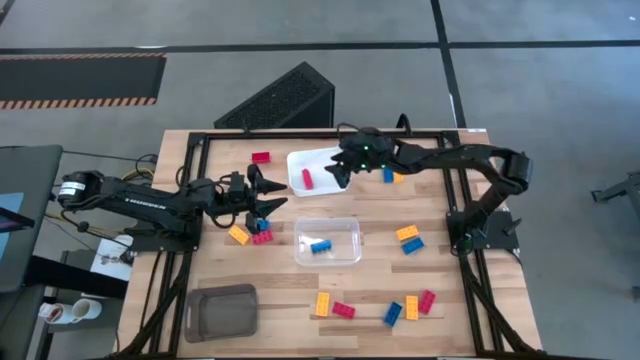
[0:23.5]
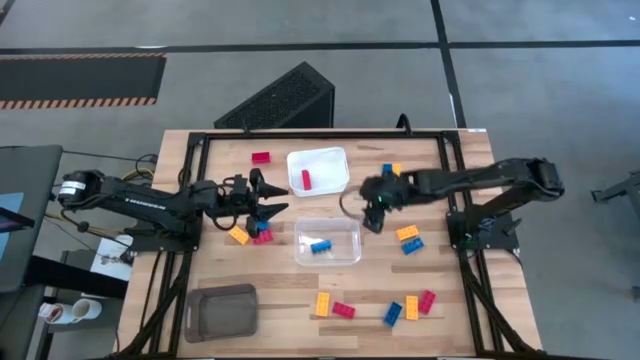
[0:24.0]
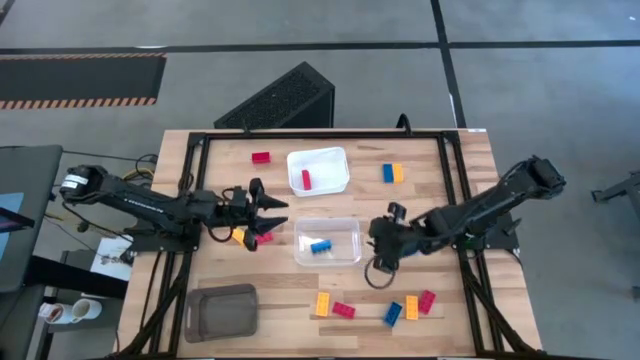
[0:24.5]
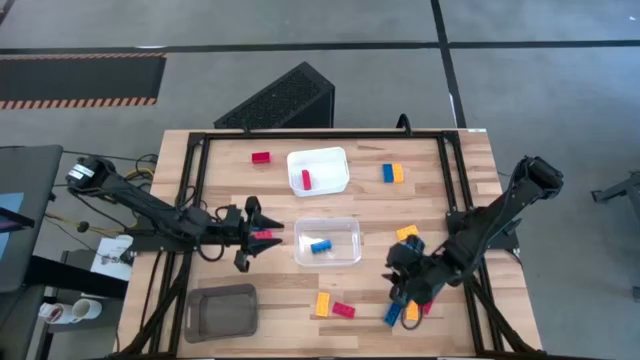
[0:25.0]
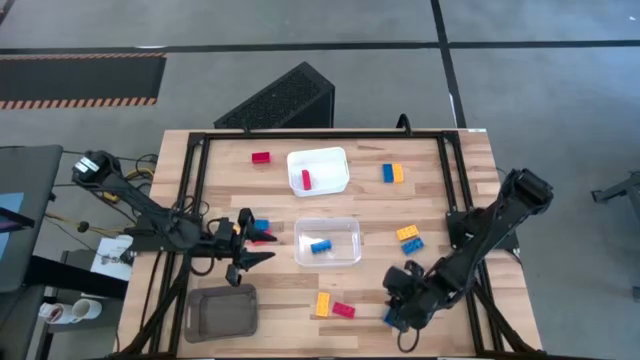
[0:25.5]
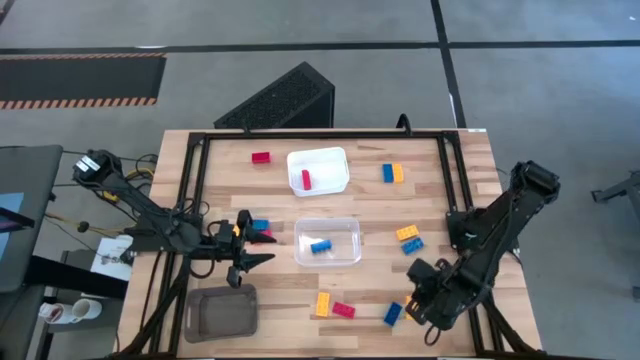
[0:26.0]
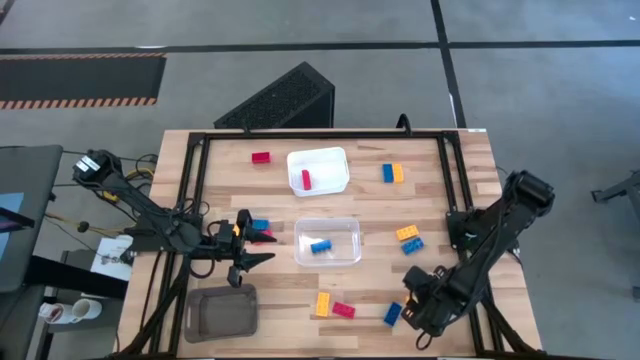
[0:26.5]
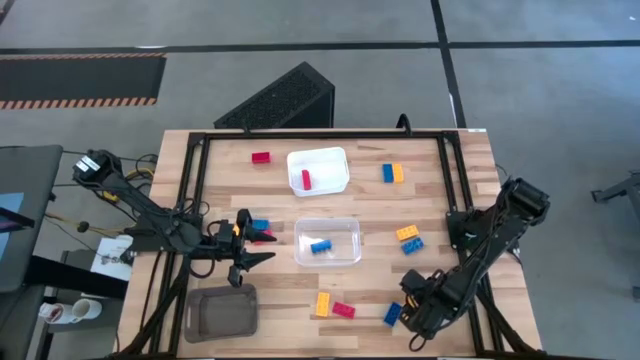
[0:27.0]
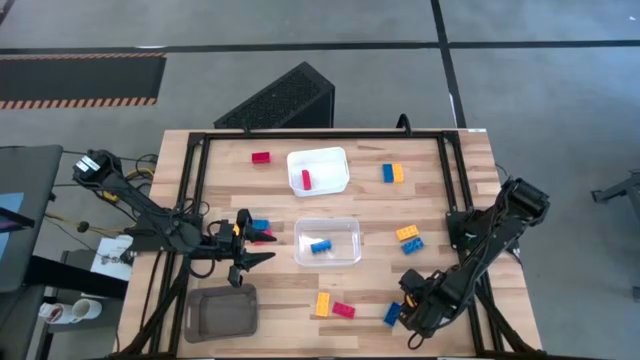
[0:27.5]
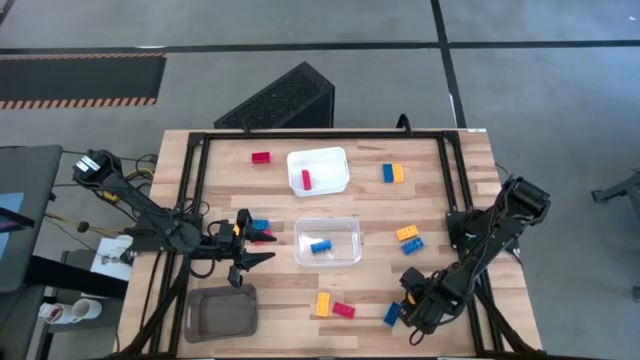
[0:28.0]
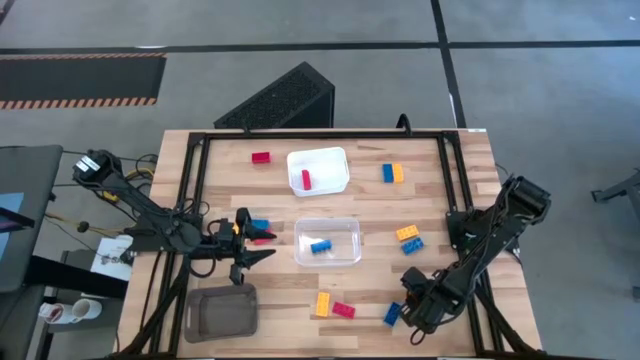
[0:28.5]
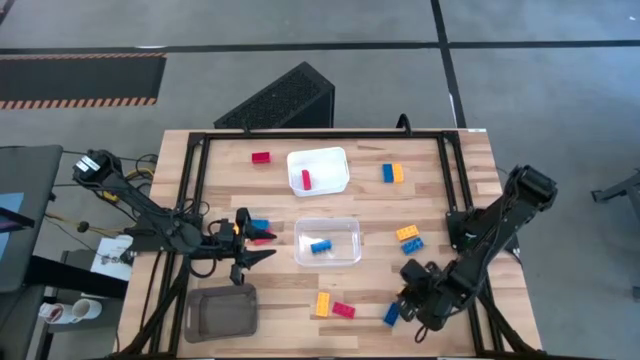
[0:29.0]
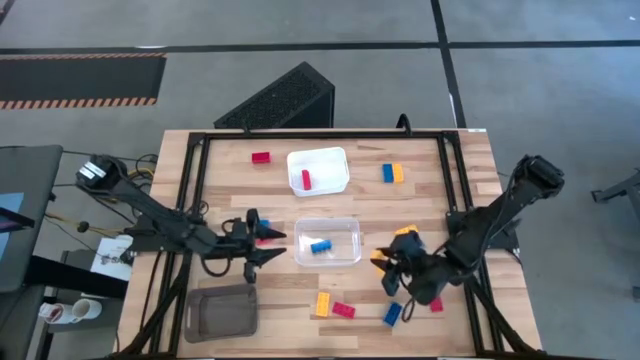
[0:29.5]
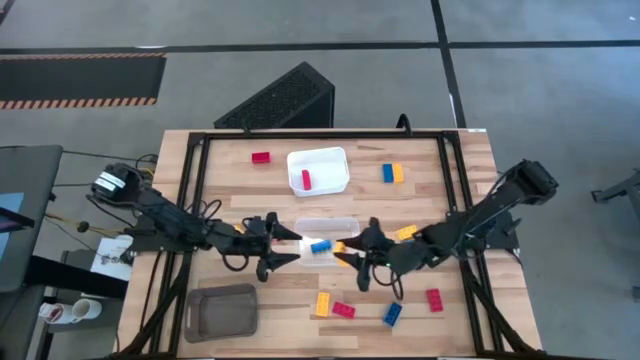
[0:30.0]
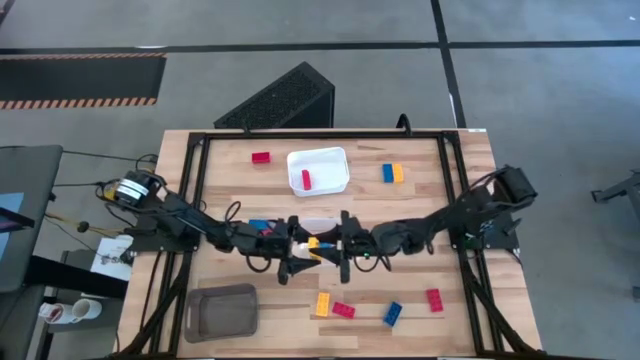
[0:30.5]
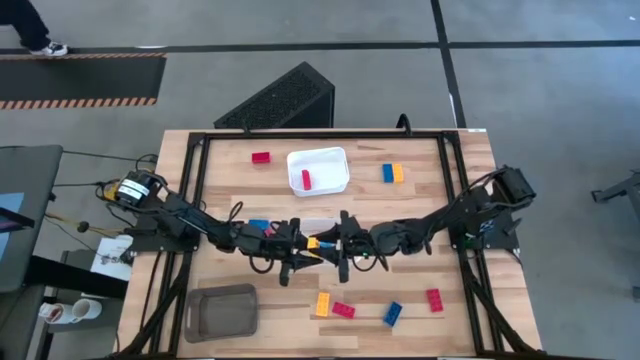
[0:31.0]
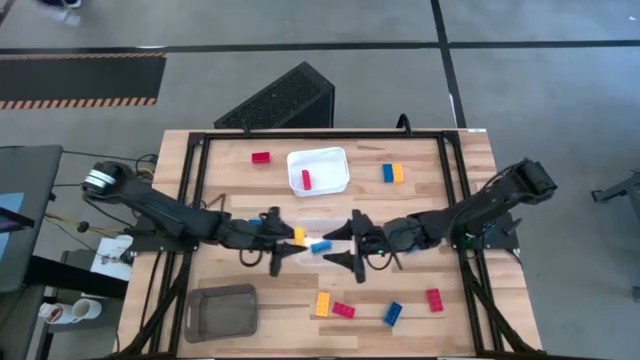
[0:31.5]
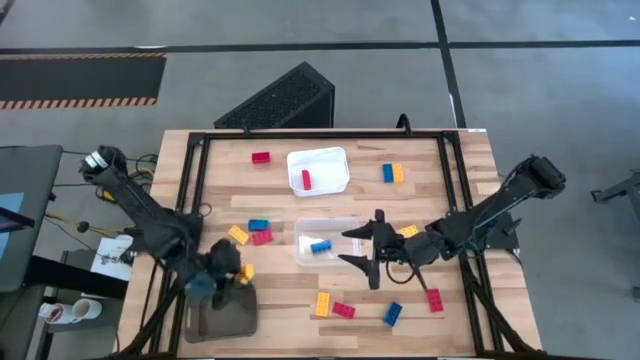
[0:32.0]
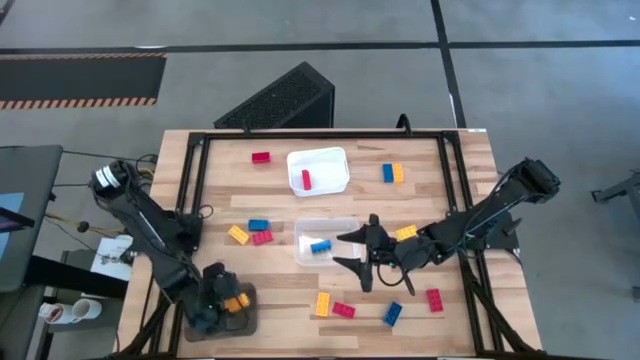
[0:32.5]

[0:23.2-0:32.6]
Task: Sort & place blocks by color
Put the yellow game piece into the black bin

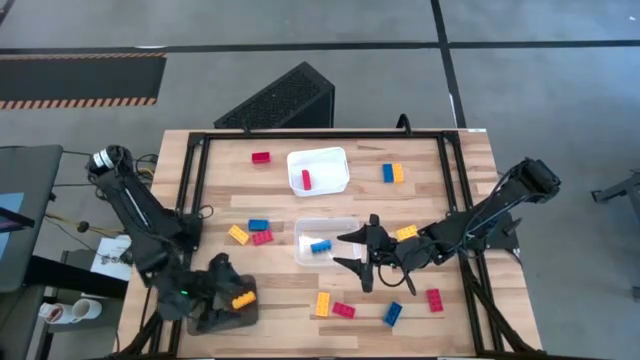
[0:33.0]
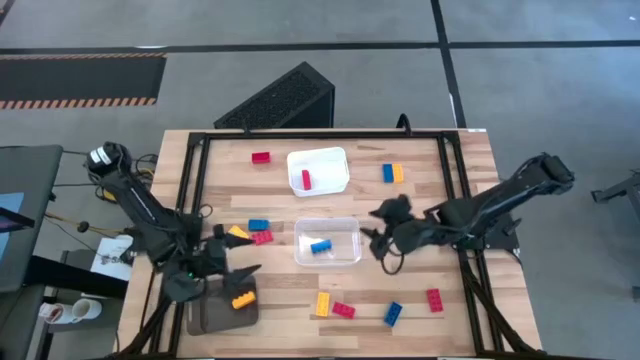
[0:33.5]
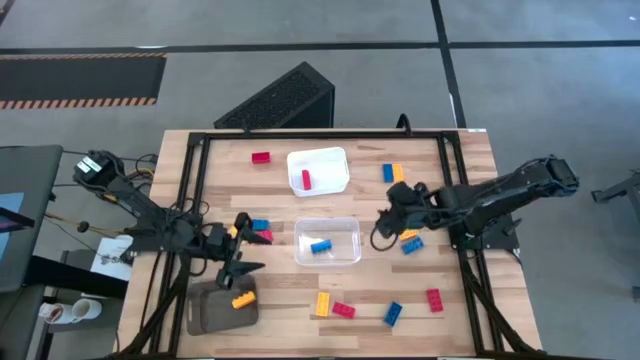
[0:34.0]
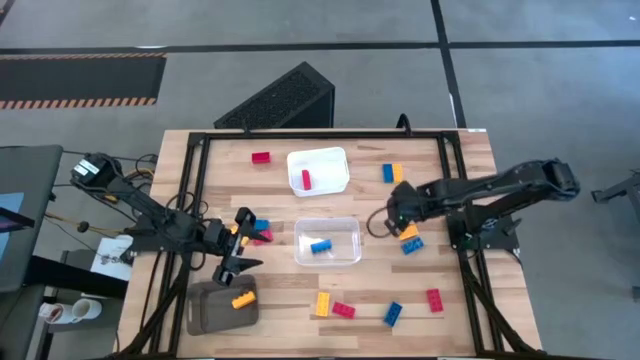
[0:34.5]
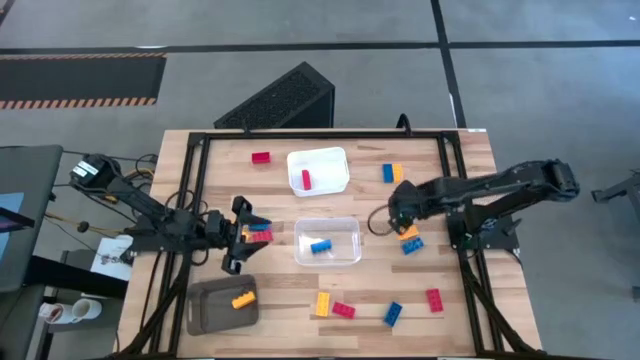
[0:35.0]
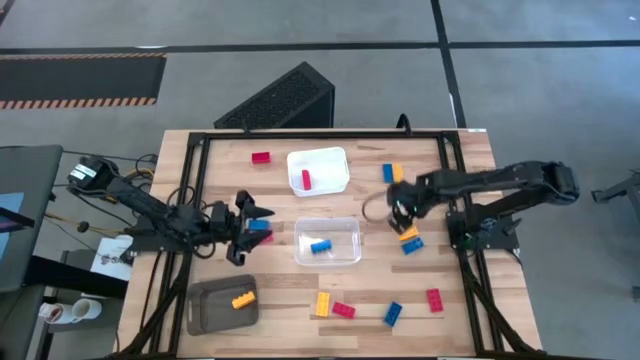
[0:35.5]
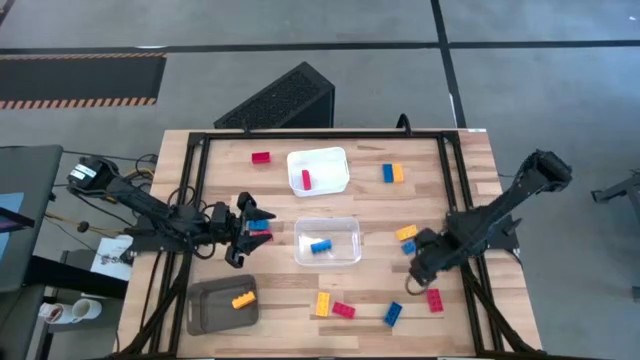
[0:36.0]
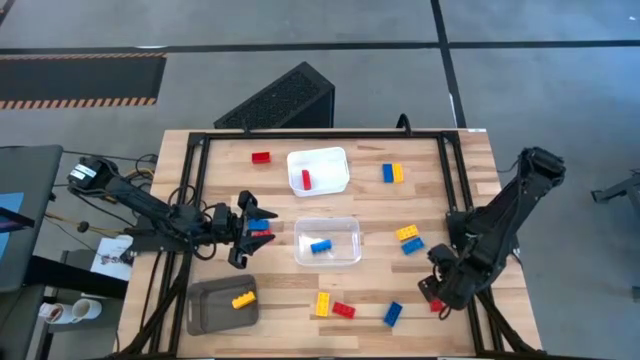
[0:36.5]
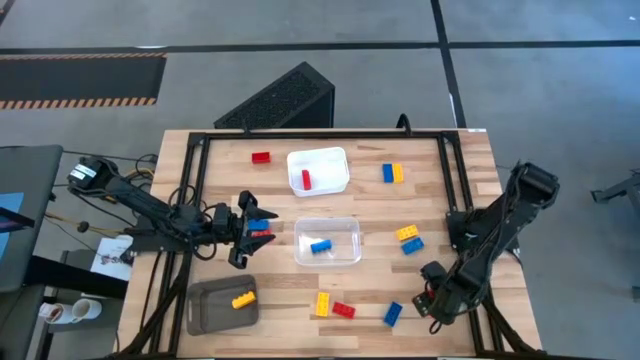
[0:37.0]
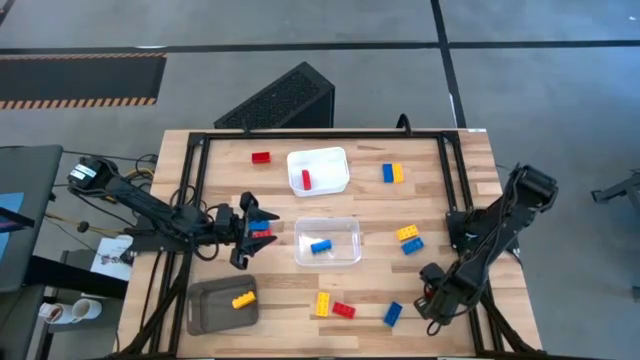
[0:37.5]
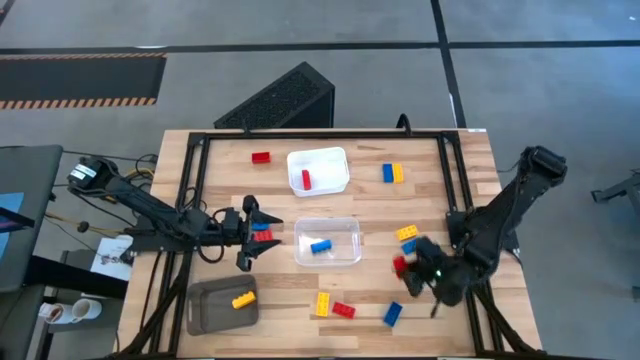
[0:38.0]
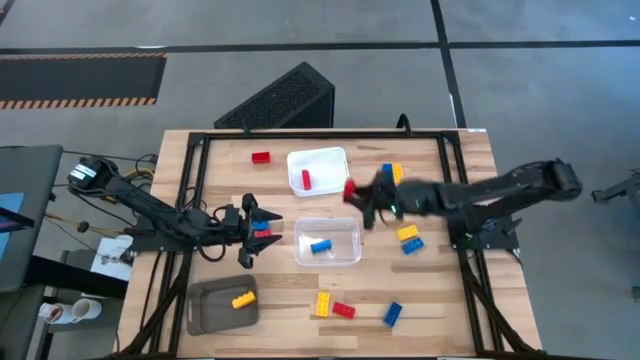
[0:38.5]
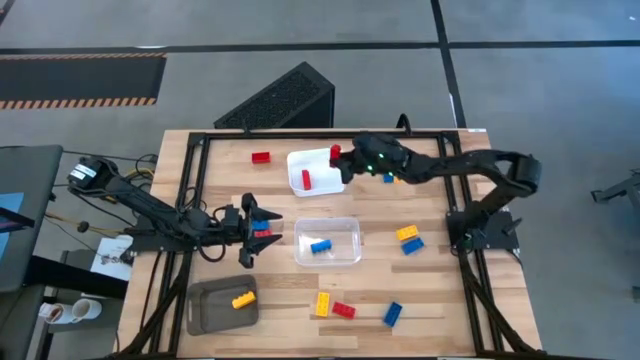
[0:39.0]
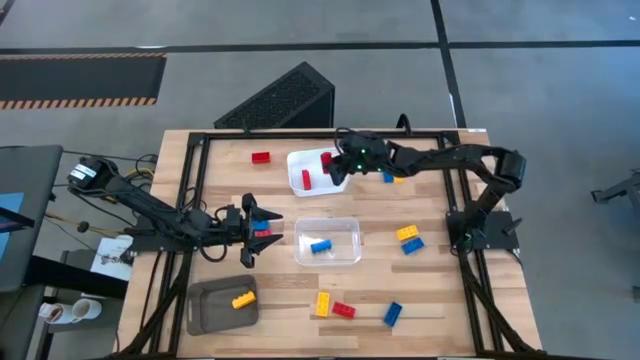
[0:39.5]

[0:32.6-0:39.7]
Put the red game piece into the white bin

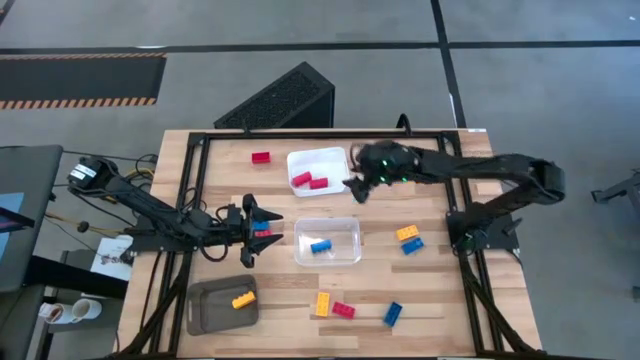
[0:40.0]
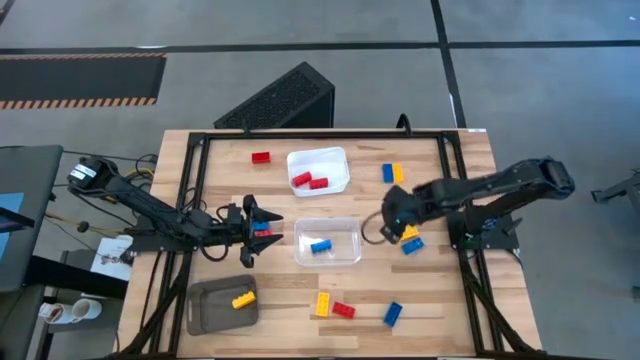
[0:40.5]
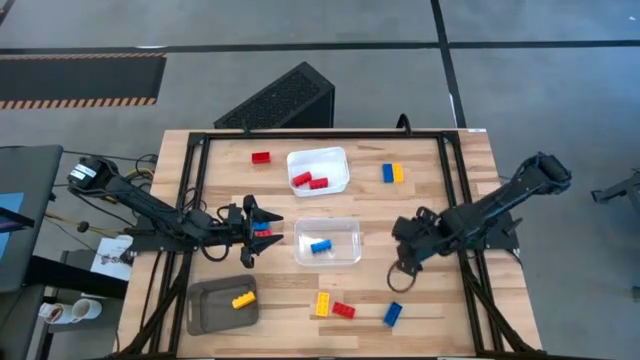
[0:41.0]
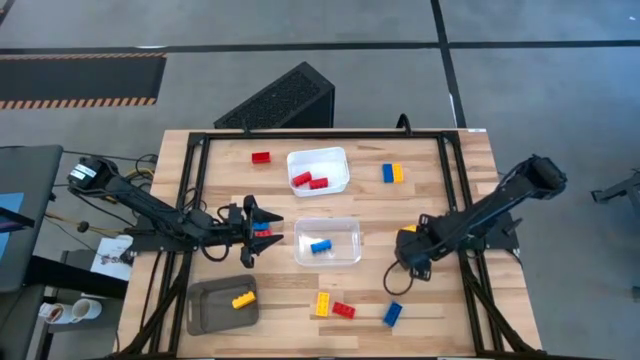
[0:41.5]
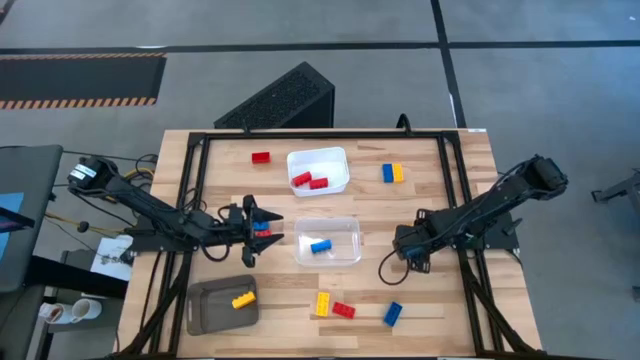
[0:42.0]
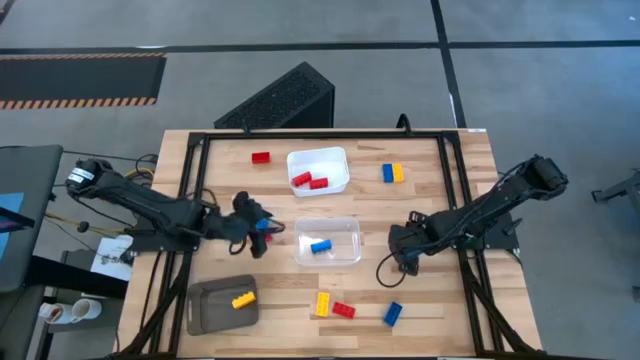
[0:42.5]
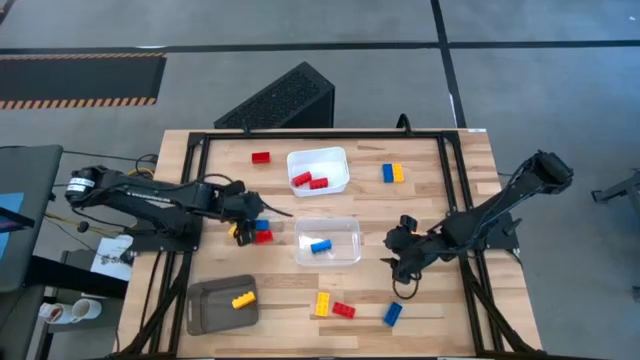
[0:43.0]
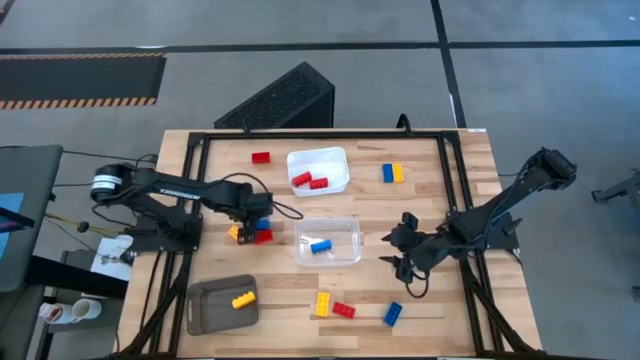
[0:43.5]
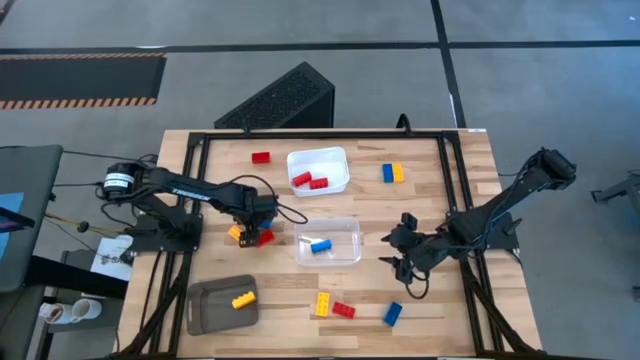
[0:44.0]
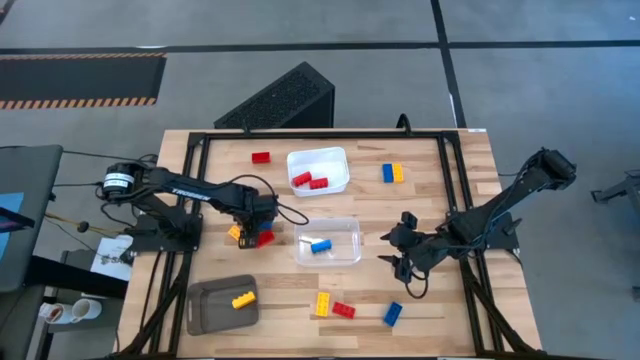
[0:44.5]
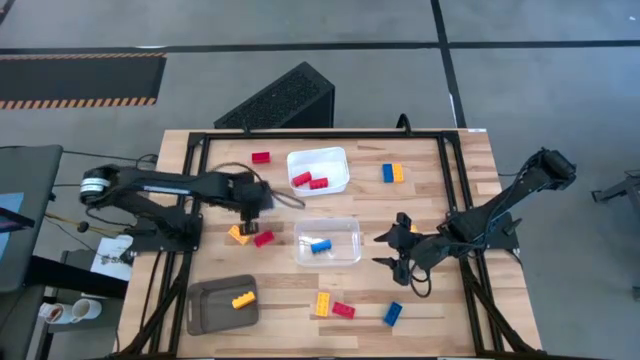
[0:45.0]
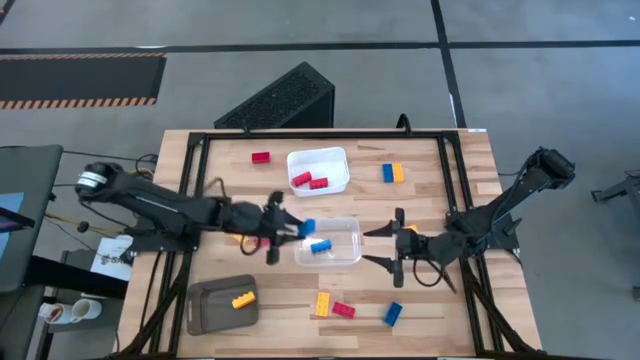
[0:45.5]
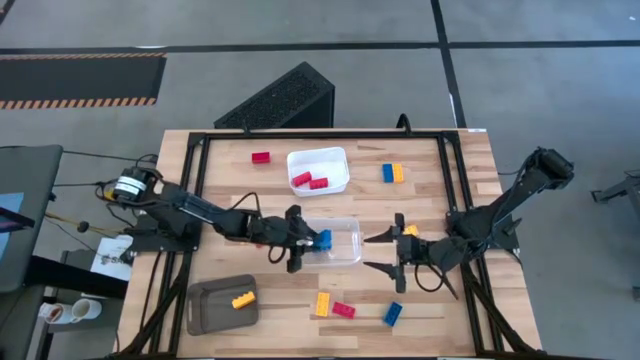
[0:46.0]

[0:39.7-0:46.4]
Put the blue game piece into the transparent bin
